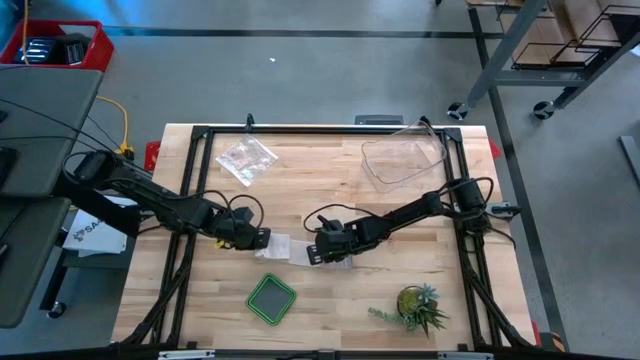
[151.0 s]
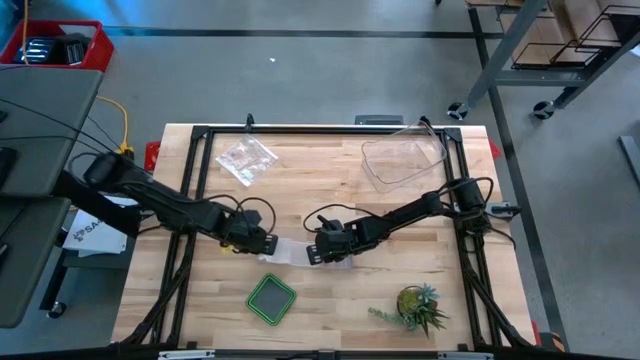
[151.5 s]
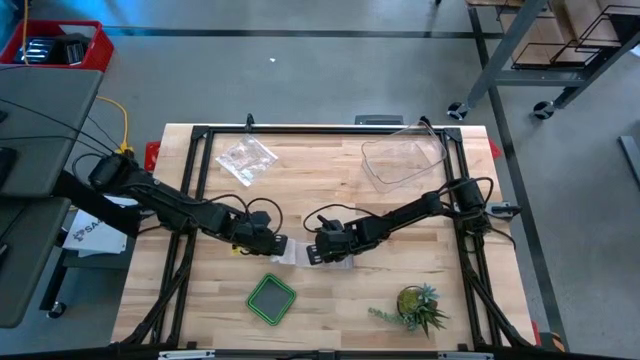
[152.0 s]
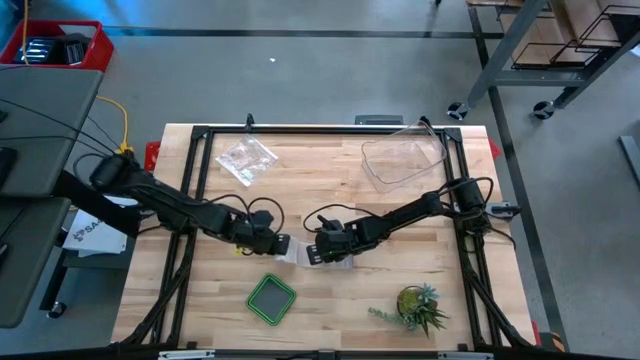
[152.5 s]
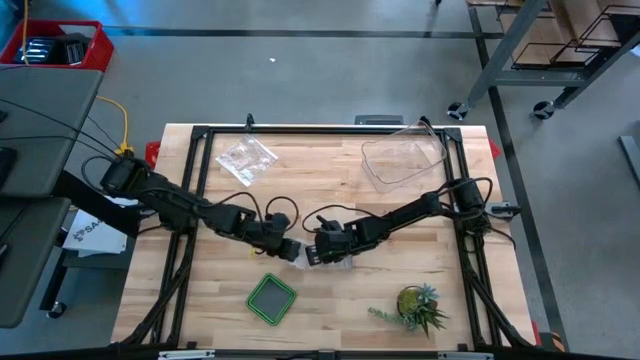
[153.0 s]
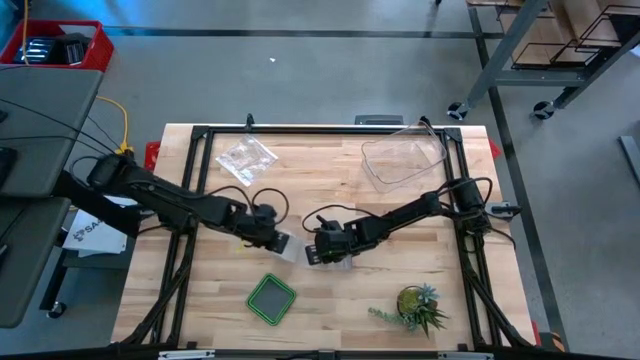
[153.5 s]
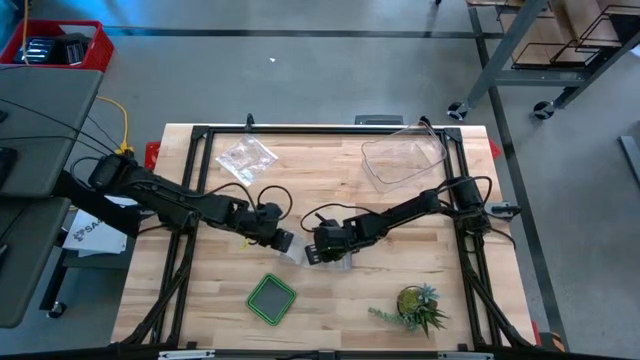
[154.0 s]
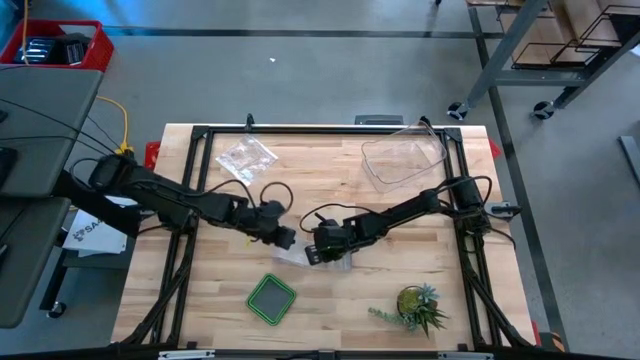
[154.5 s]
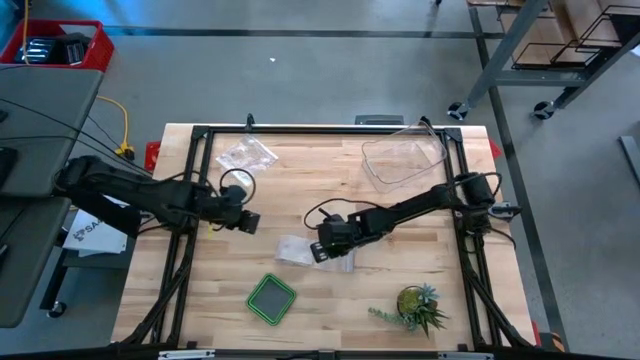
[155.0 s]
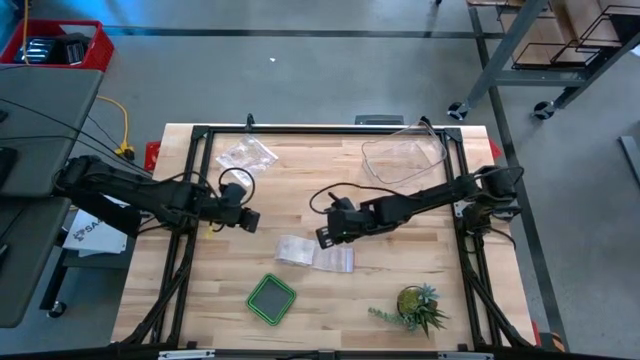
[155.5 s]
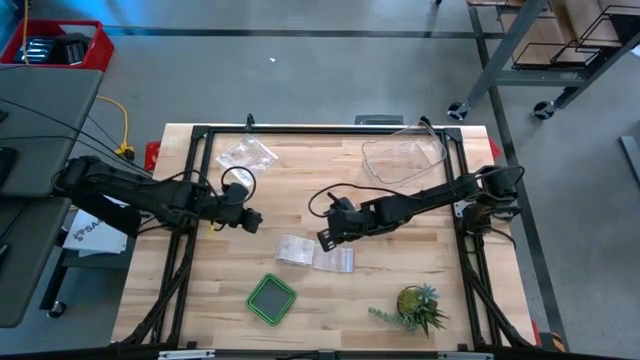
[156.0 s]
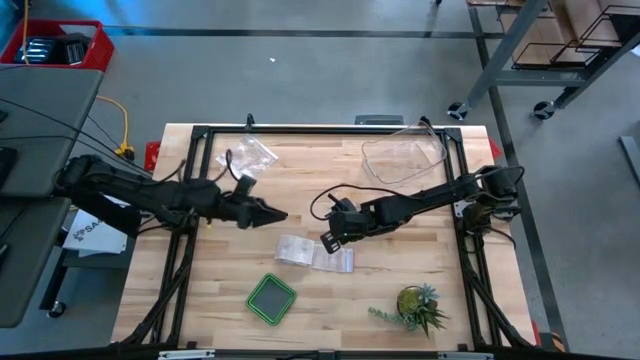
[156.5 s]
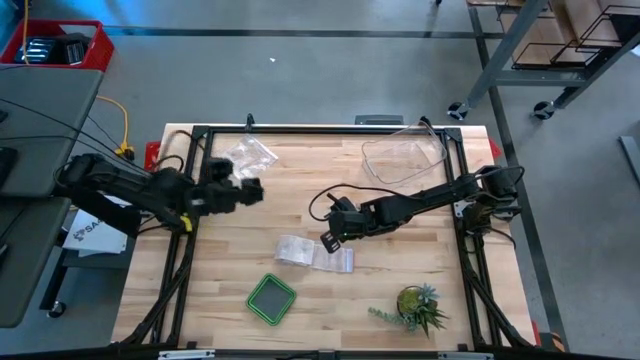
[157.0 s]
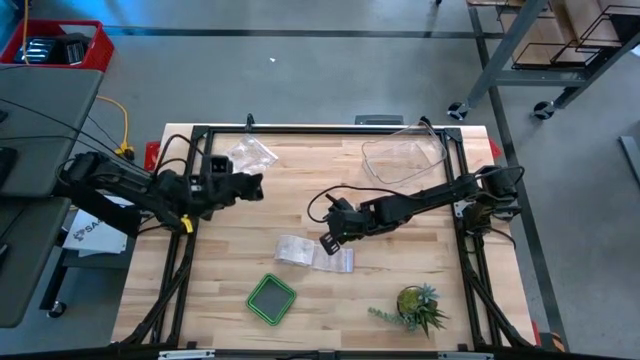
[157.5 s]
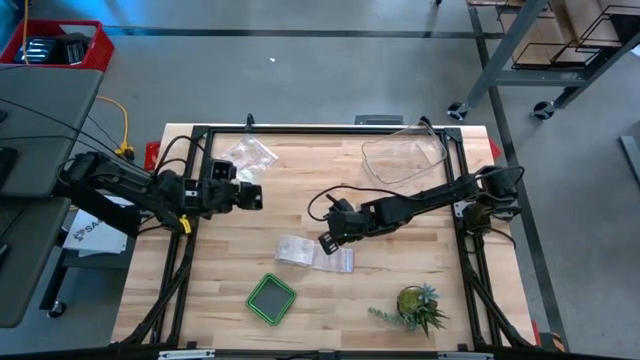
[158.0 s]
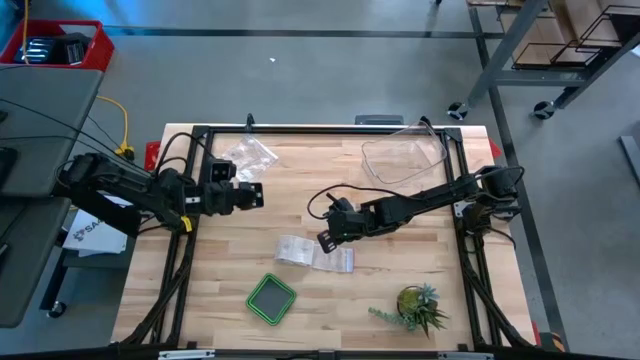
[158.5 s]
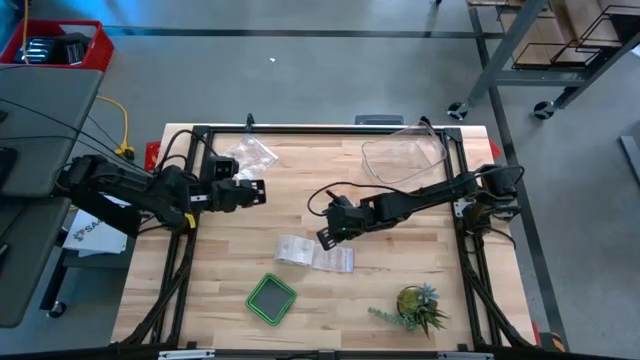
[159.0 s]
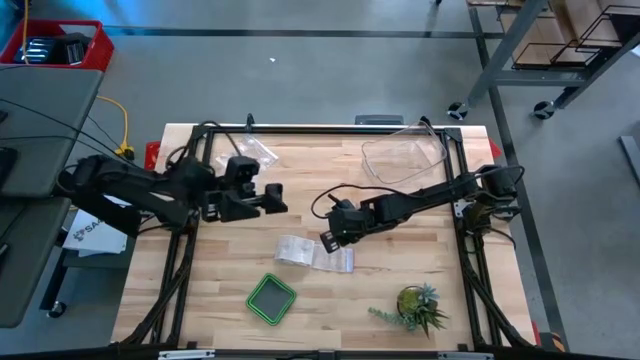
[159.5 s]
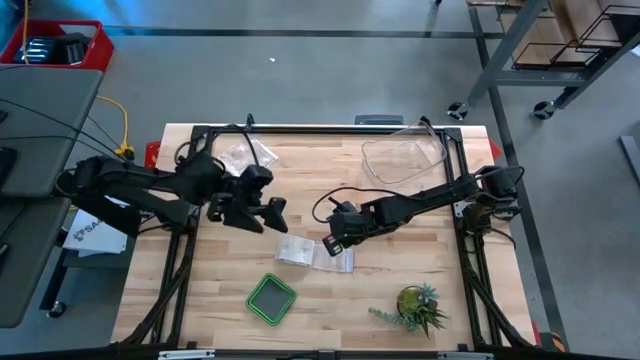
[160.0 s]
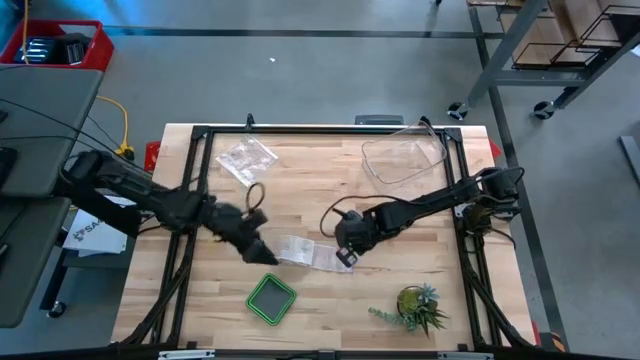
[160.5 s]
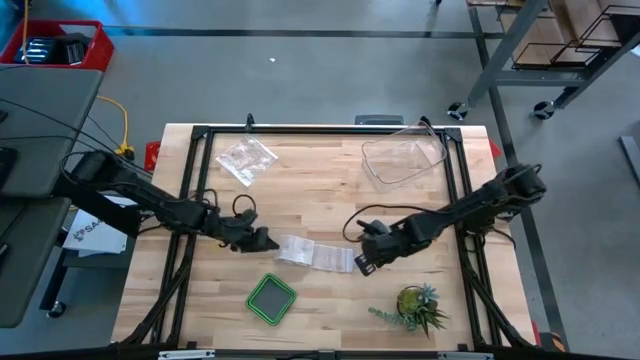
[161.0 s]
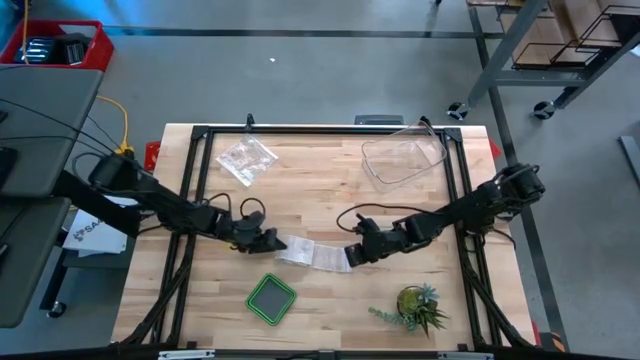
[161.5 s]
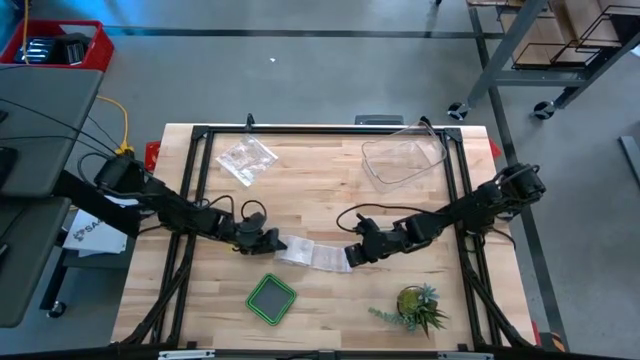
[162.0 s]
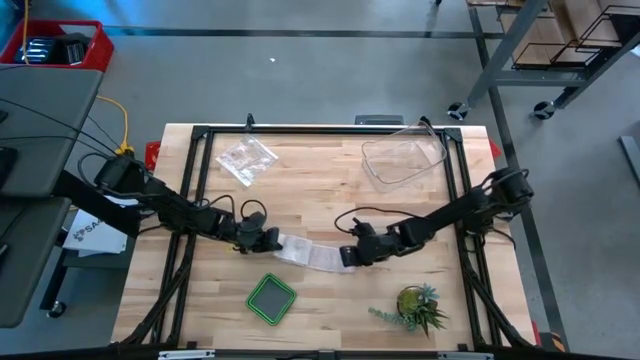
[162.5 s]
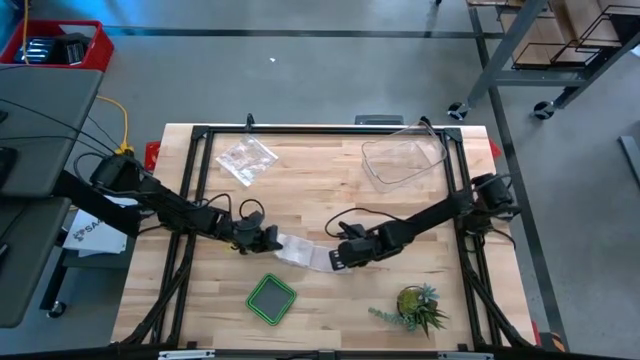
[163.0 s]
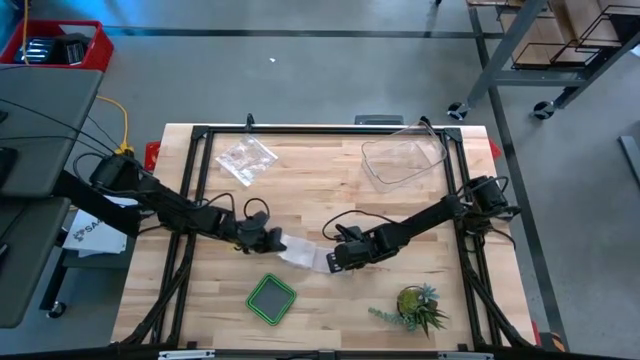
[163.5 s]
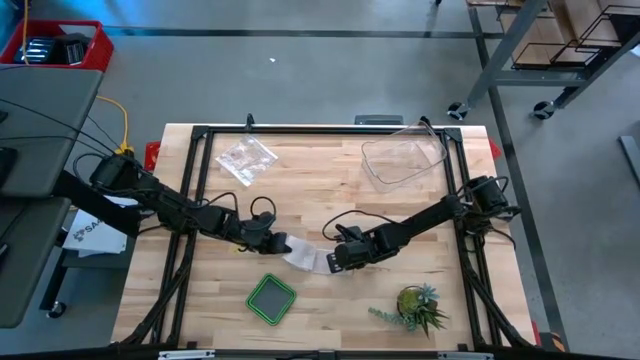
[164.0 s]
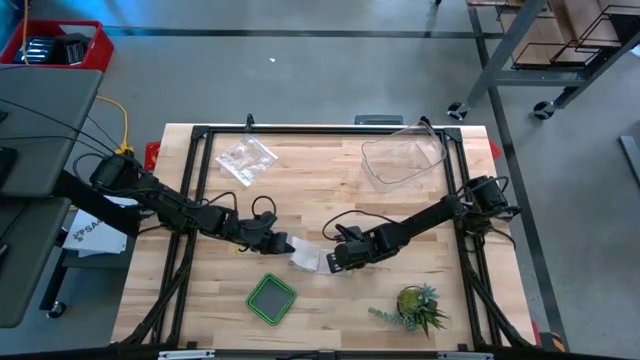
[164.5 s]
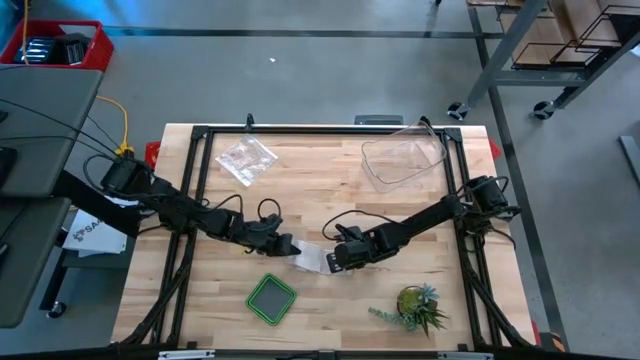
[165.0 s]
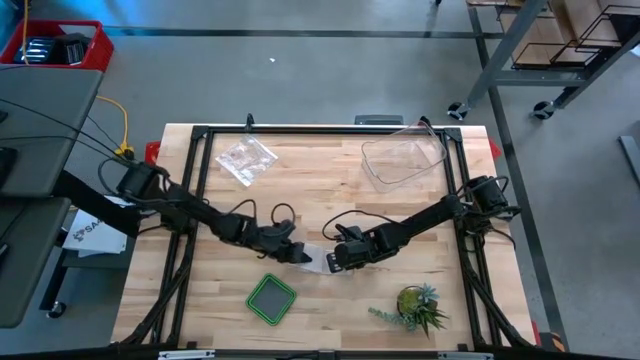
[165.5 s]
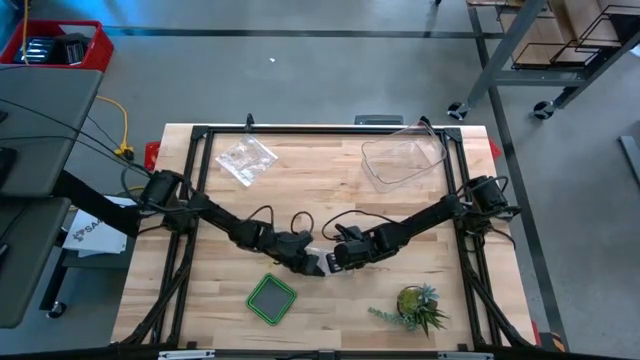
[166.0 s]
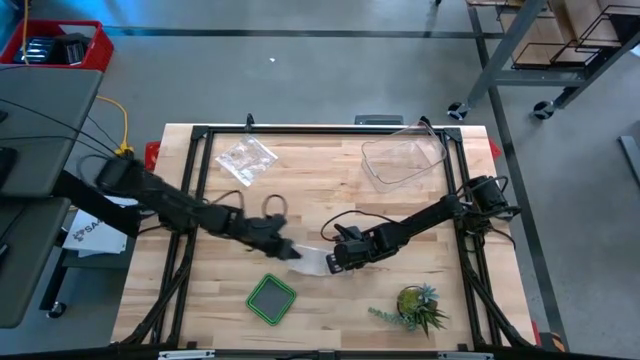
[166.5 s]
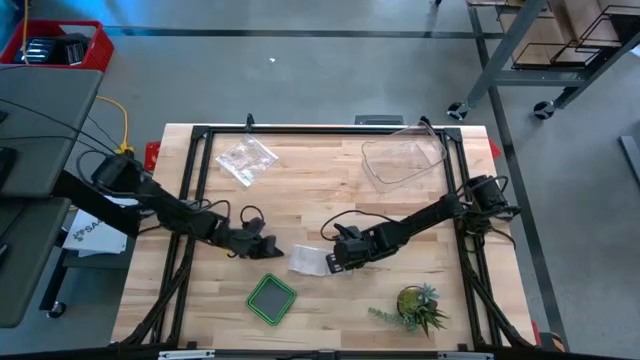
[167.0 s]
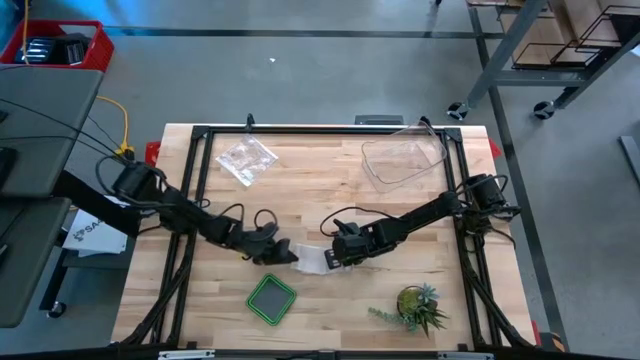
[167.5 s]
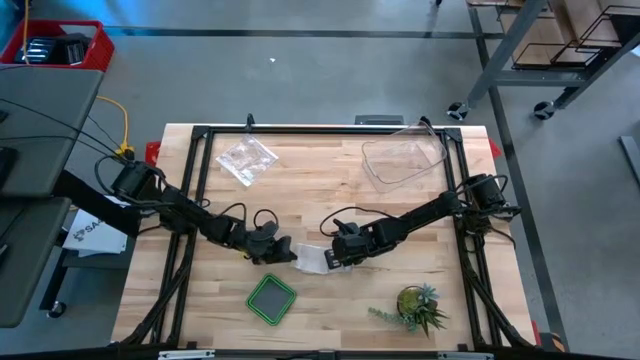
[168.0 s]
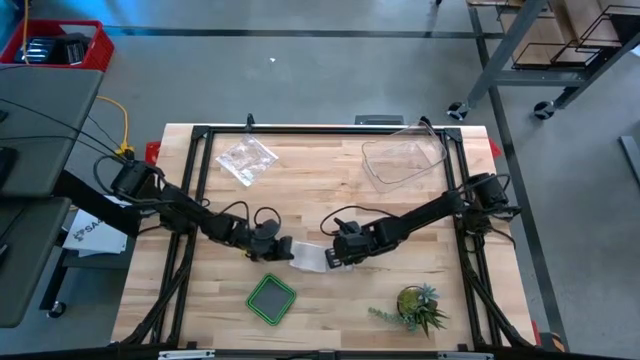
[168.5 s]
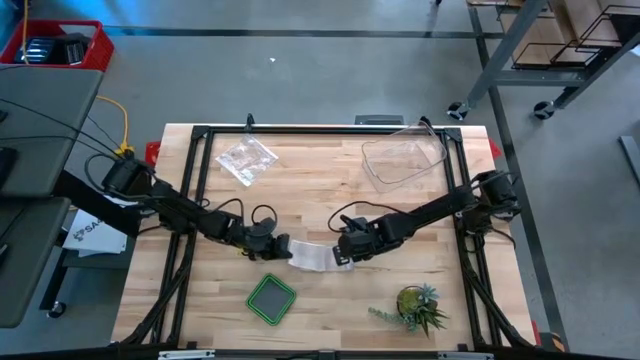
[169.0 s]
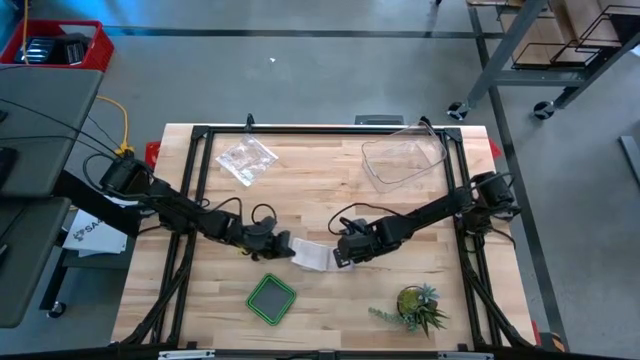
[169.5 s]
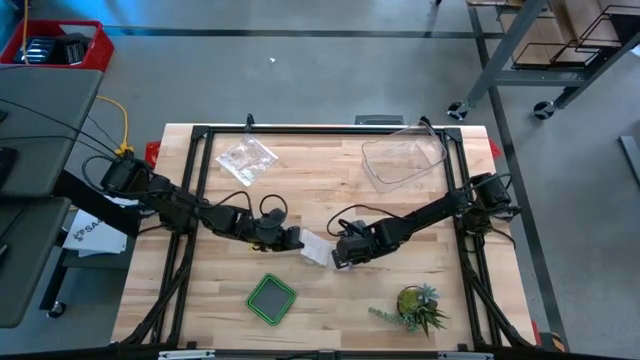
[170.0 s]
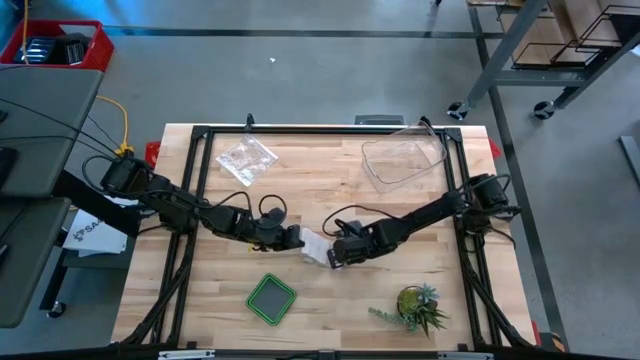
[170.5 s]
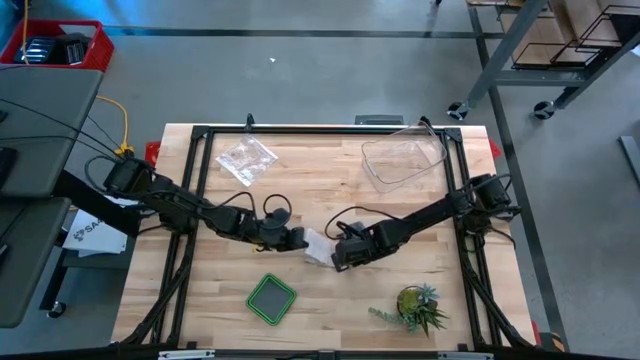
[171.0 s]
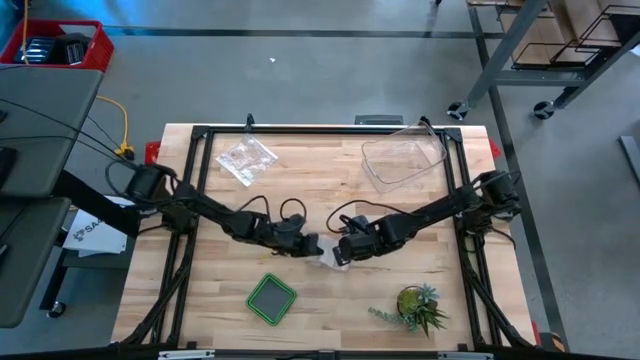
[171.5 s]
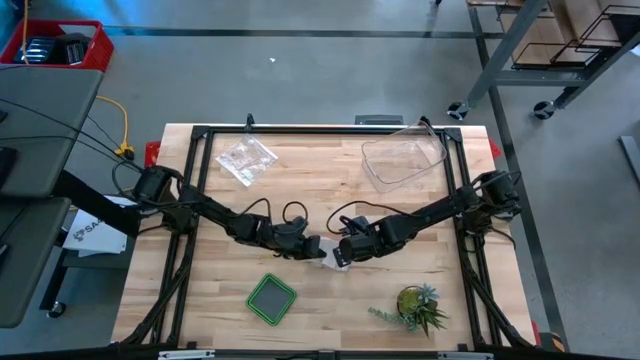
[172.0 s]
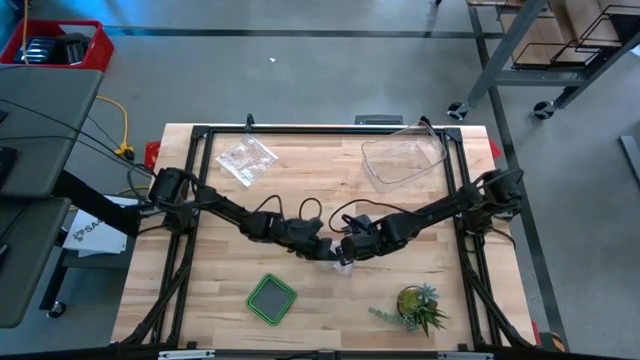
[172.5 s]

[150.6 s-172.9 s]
Task: Roll bandage
Roll the white bandage
